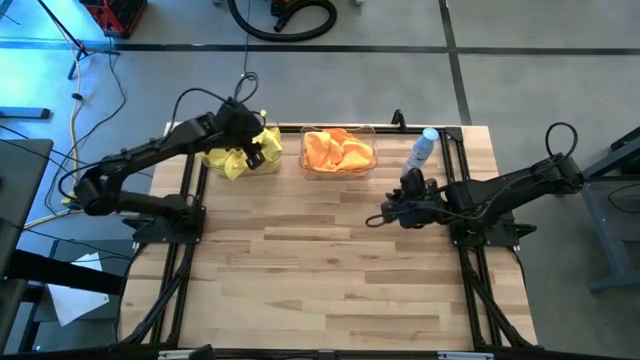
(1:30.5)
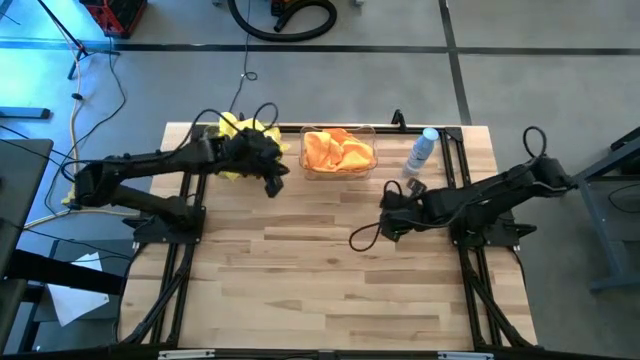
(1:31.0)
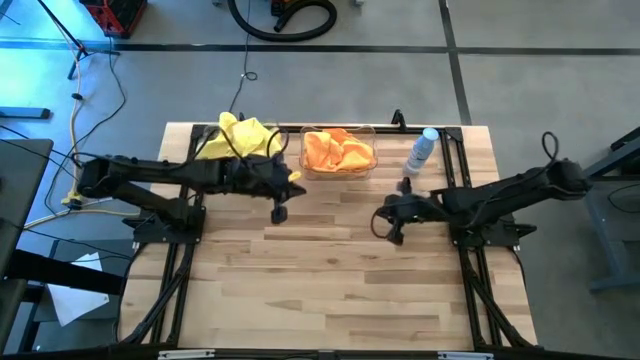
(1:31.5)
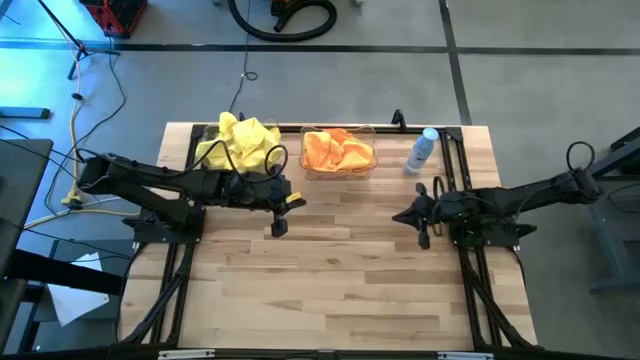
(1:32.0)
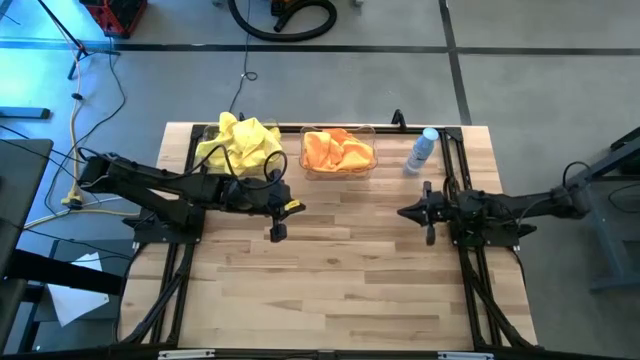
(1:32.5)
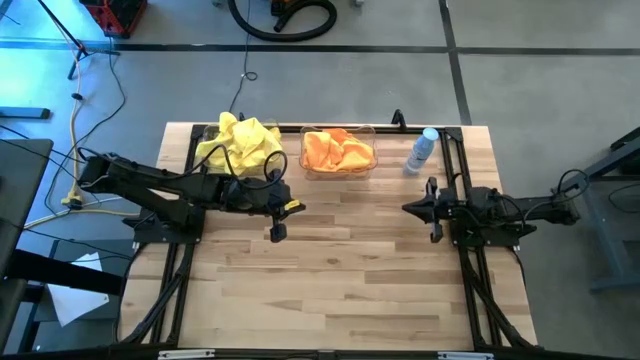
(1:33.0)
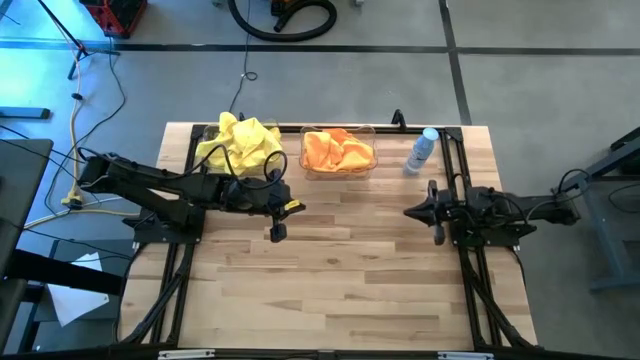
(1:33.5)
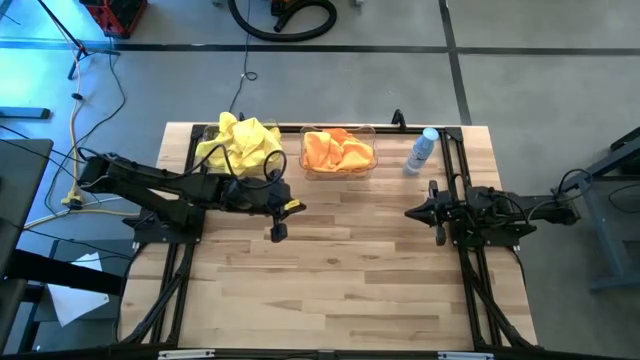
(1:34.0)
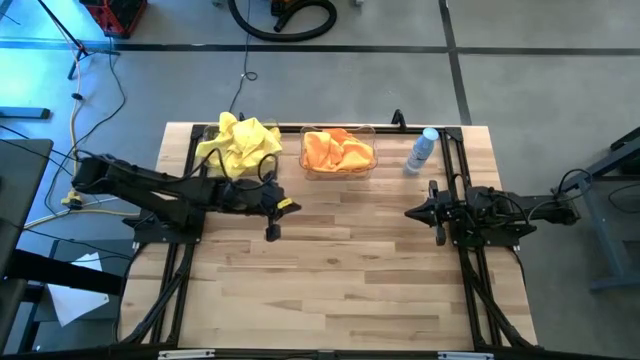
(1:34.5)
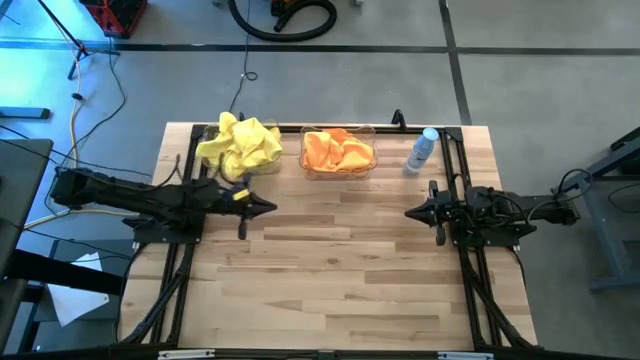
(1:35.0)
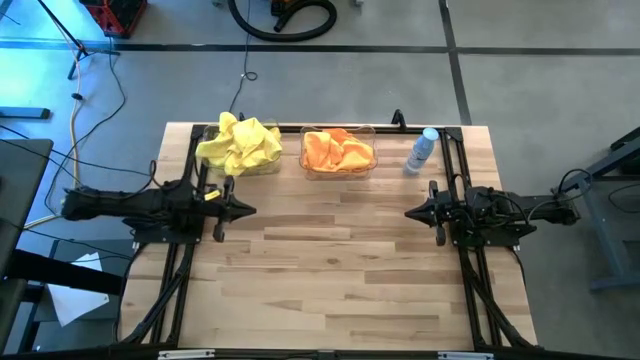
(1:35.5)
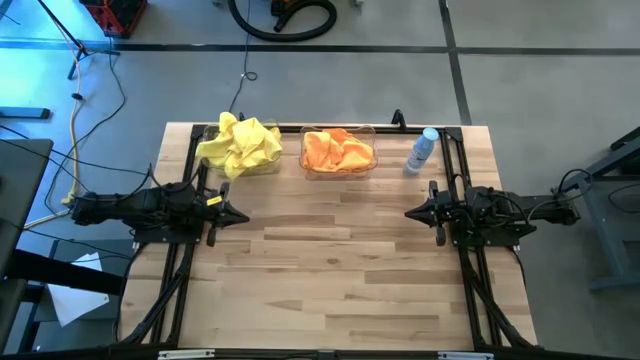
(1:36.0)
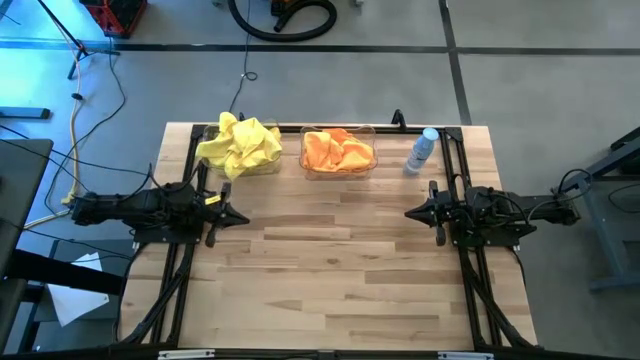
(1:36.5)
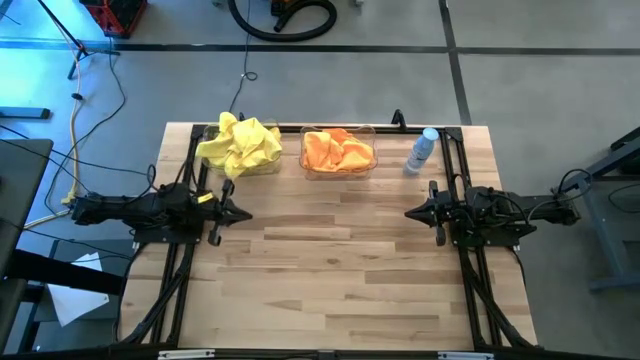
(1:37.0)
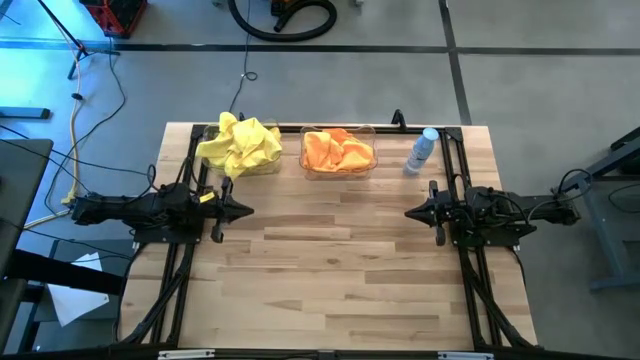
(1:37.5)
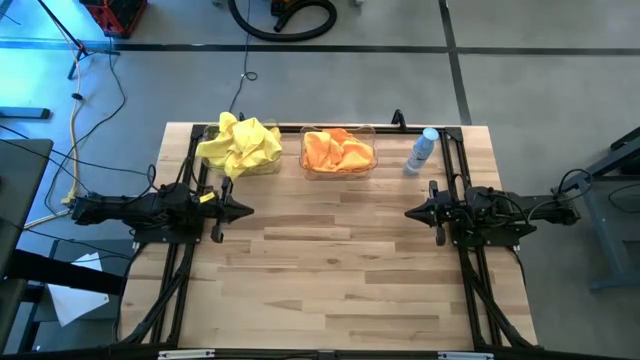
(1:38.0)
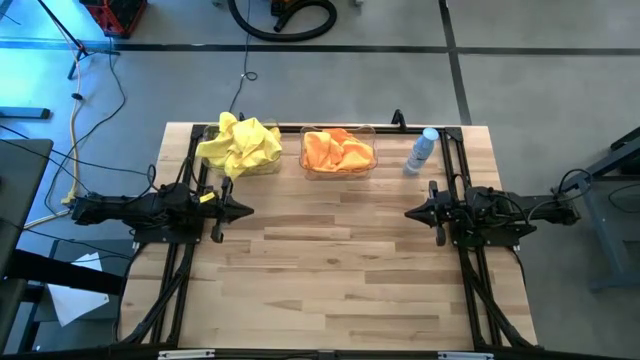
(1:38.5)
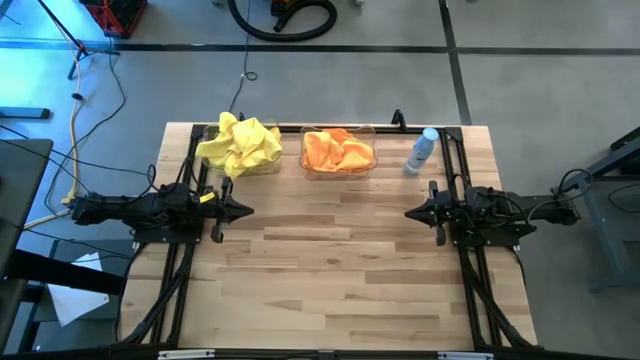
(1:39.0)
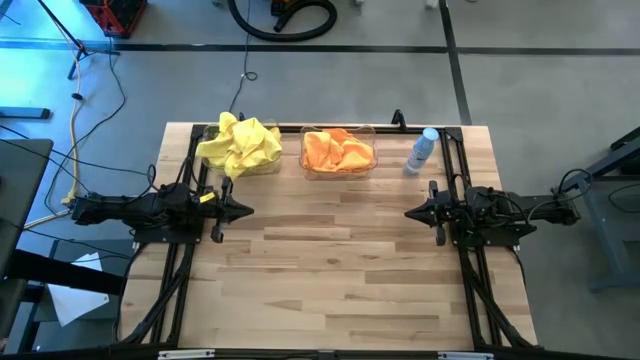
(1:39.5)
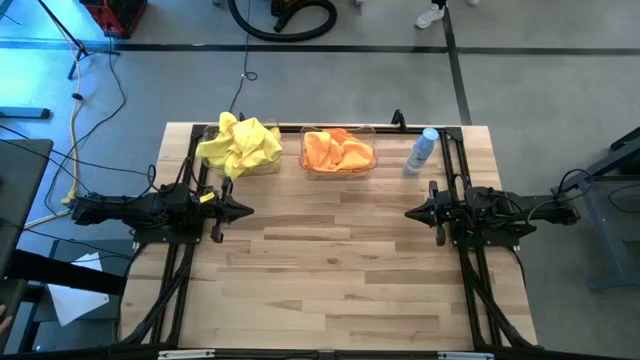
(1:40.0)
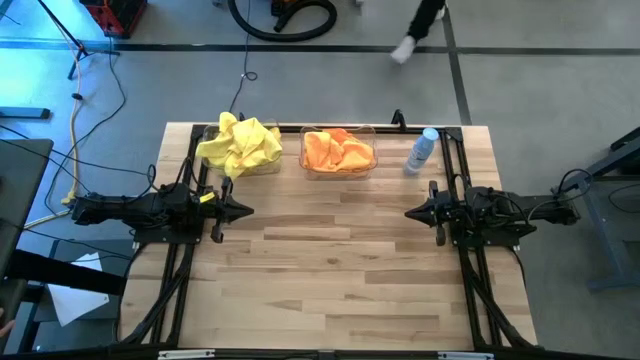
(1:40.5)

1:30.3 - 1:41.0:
Task: Sort microfiber towel by color & place in baskets
Return to Home Position

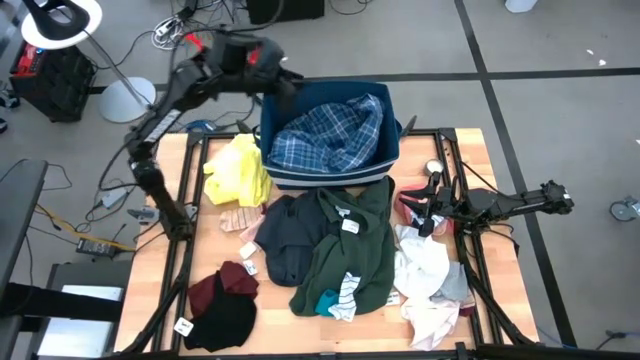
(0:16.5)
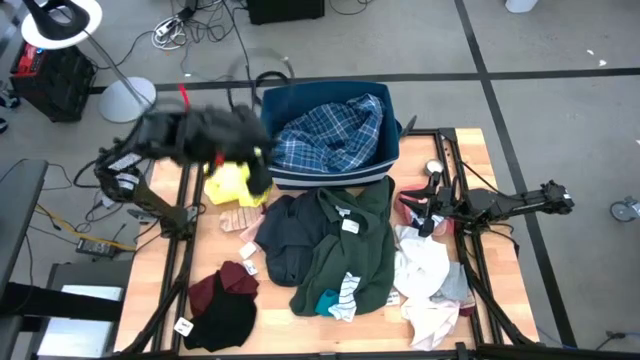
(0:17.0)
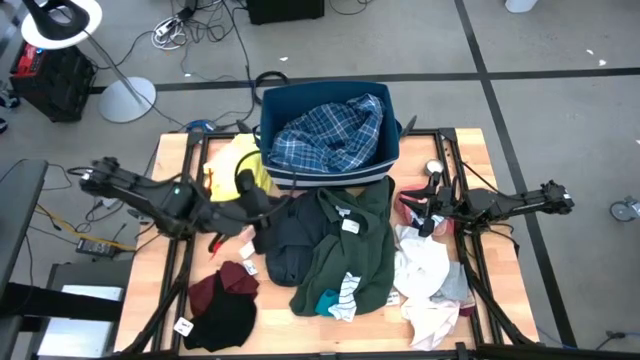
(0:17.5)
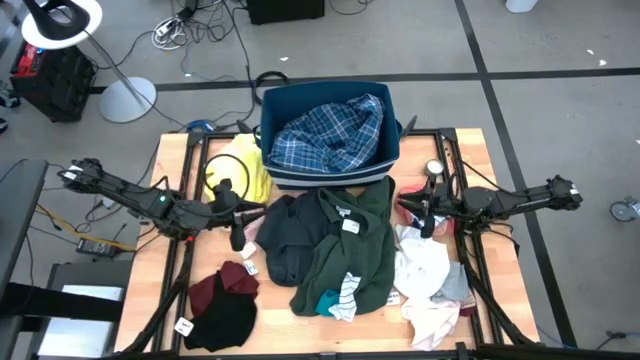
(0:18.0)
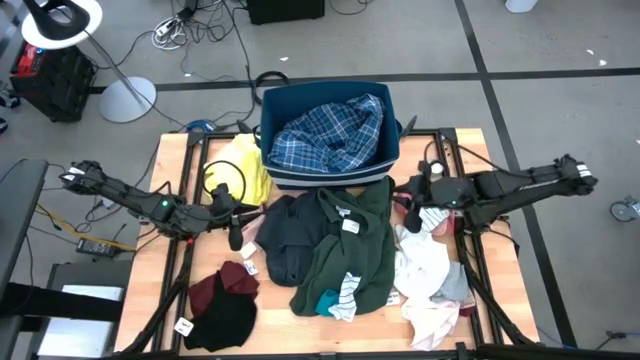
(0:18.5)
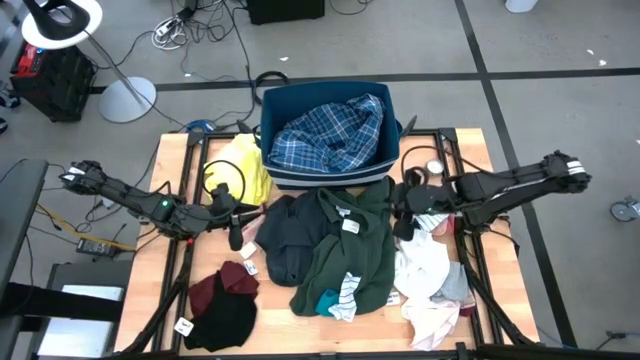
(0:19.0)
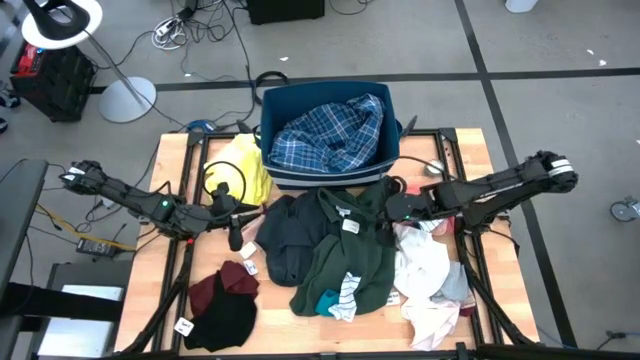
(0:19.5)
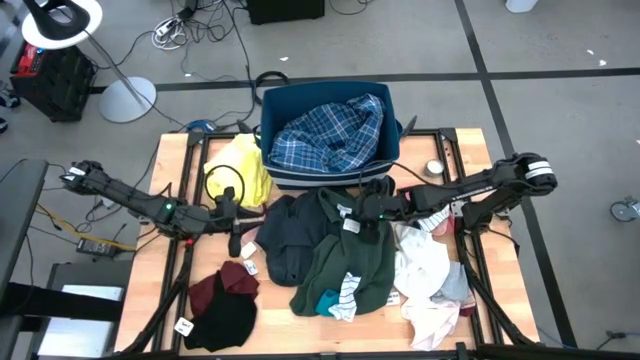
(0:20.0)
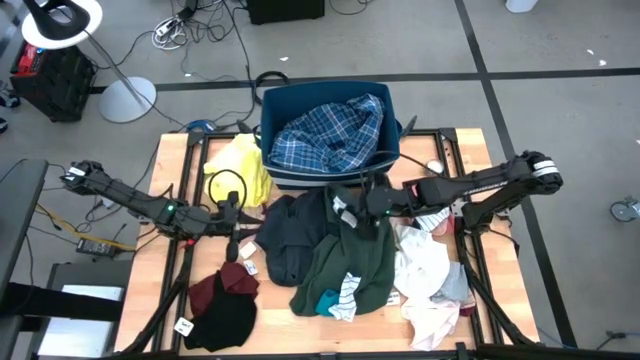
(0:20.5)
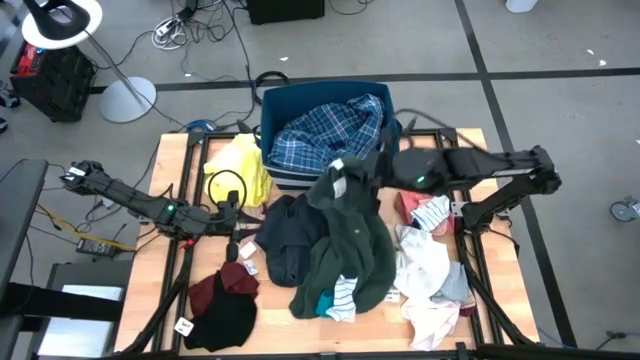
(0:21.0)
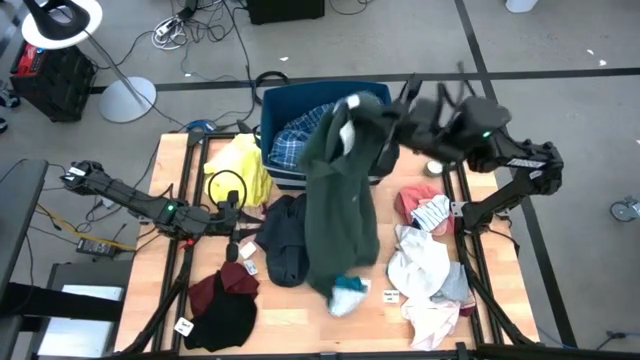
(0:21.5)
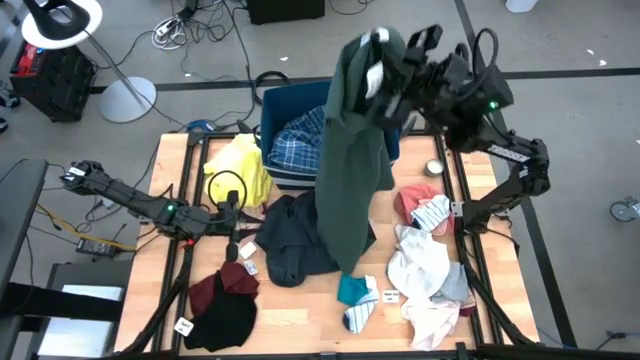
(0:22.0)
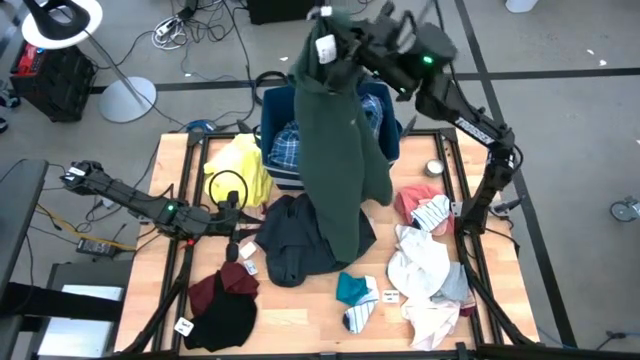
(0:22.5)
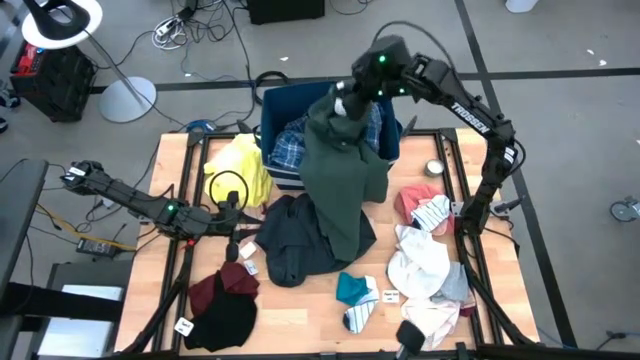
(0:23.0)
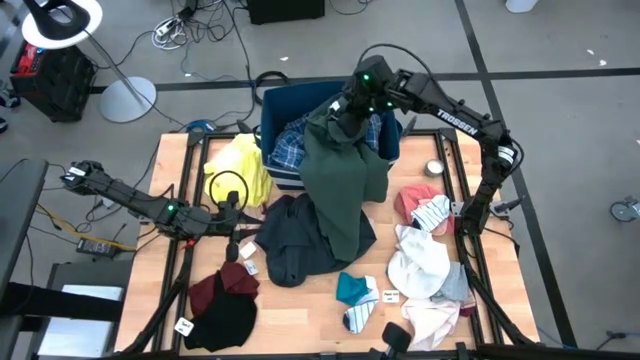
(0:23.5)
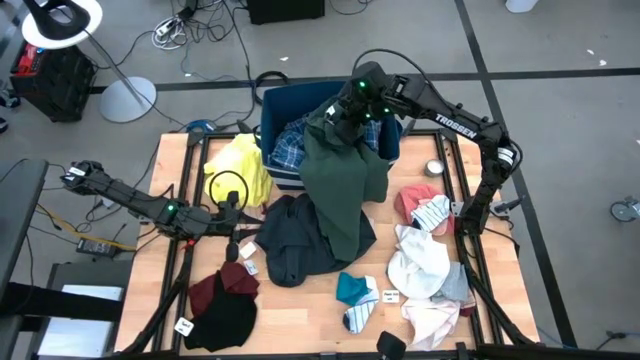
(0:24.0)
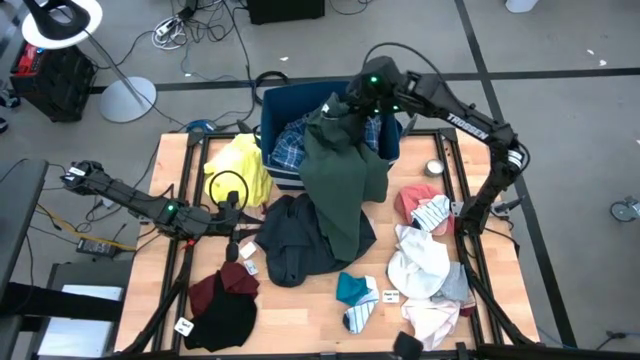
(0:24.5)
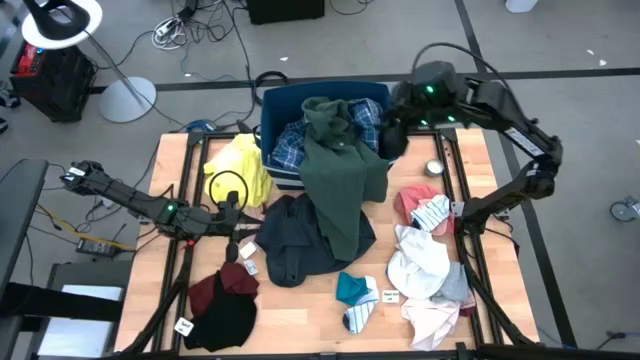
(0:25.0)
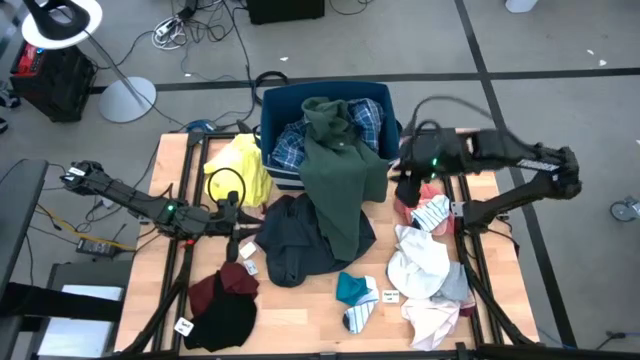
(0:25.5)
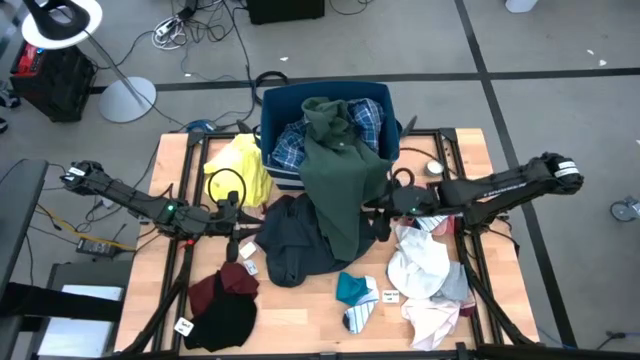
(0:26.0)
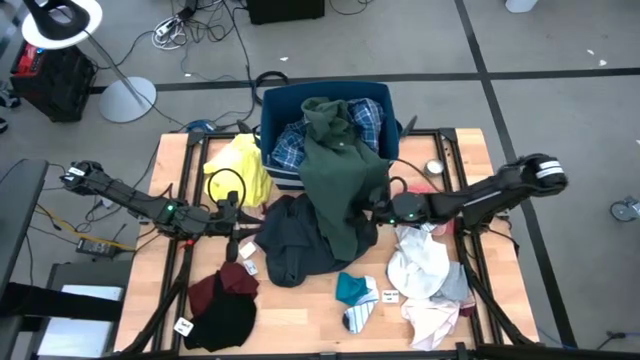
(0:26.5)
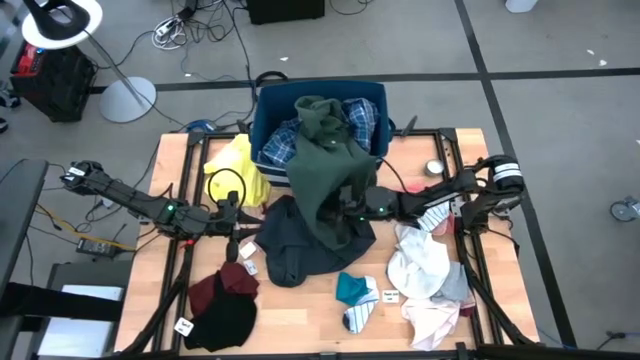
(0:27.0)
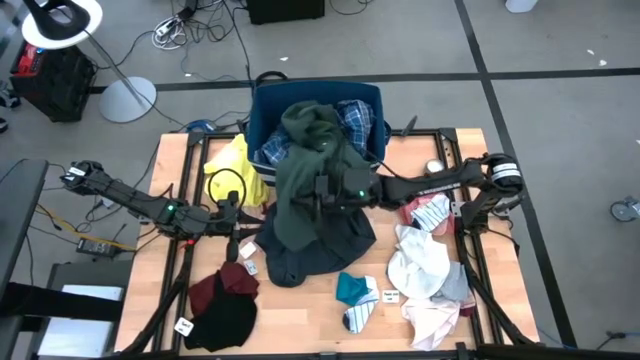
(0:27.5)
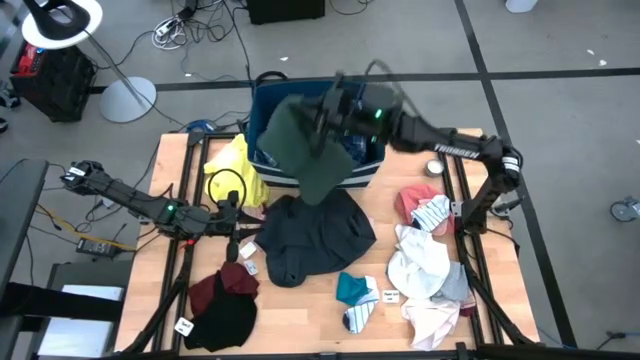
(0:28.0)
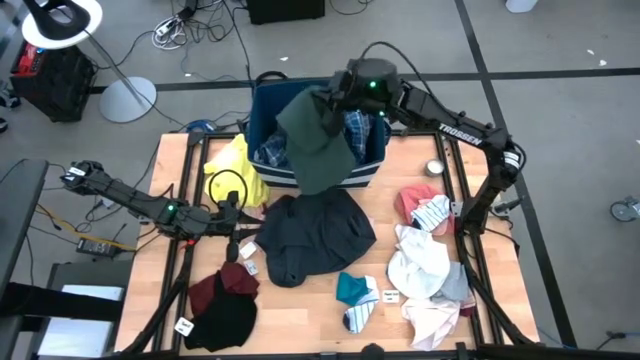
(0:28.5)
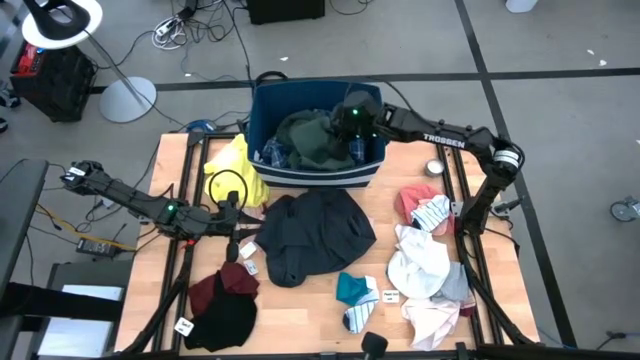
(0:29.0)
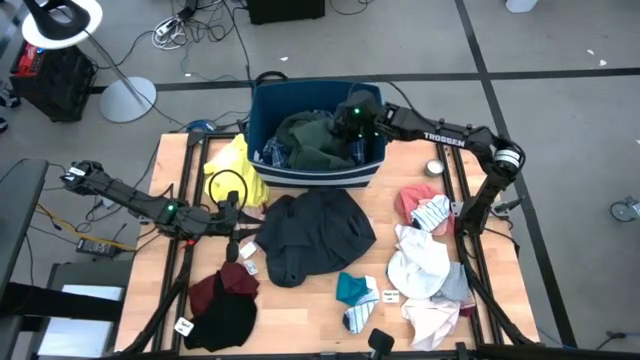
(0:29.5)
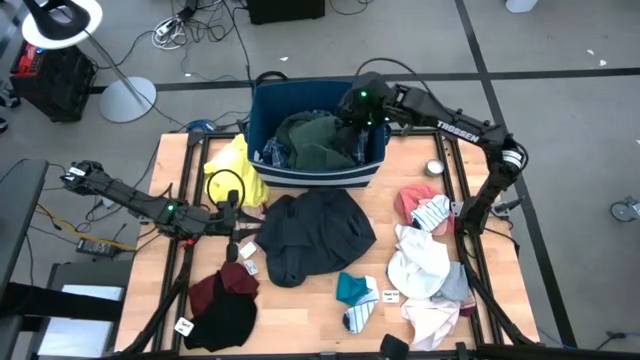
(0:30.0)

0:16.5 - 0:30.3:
Task: Sort clothes
Put the green jacket into the blue laundry bin
